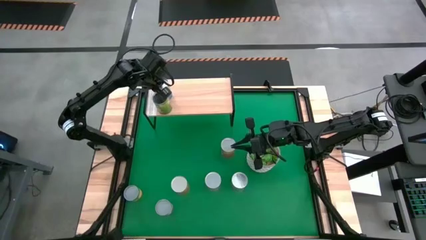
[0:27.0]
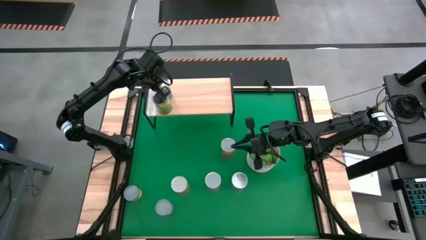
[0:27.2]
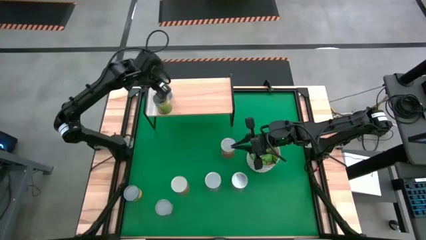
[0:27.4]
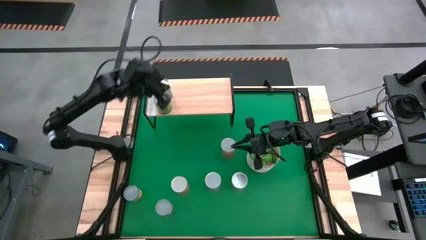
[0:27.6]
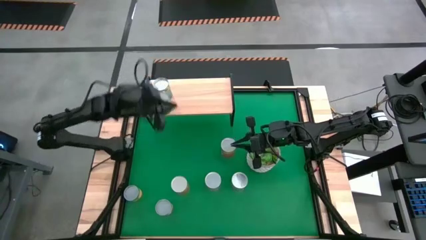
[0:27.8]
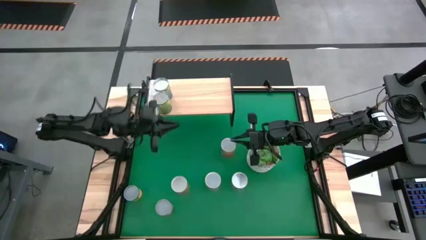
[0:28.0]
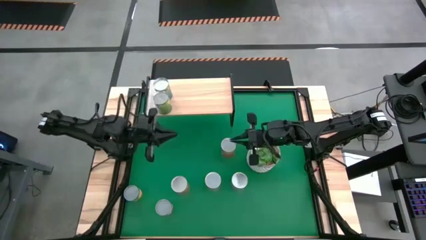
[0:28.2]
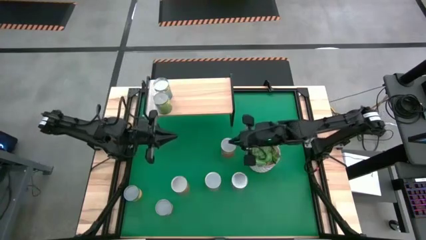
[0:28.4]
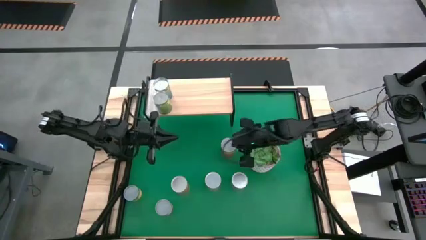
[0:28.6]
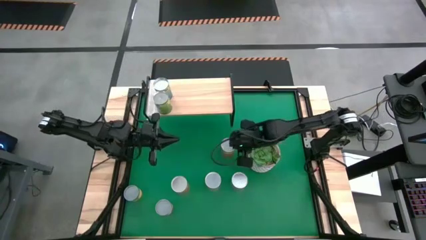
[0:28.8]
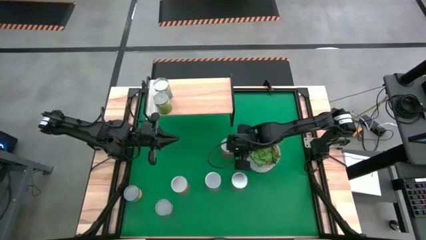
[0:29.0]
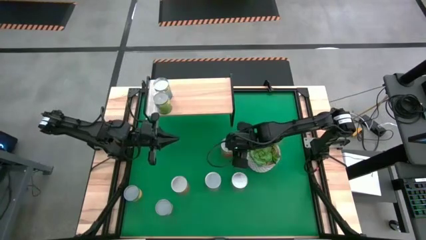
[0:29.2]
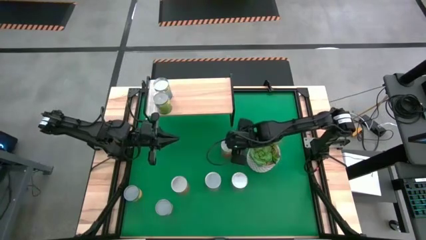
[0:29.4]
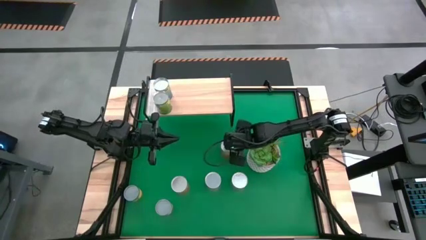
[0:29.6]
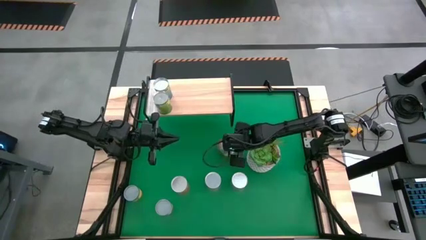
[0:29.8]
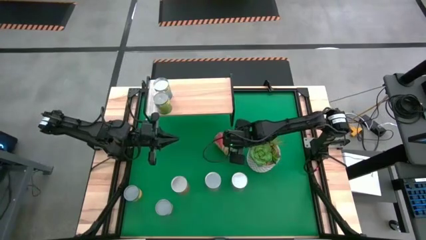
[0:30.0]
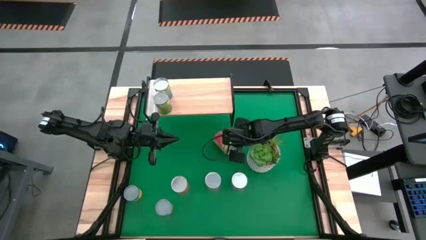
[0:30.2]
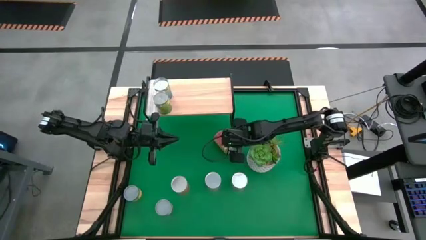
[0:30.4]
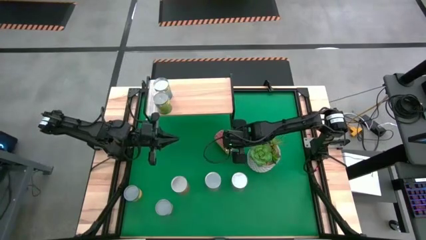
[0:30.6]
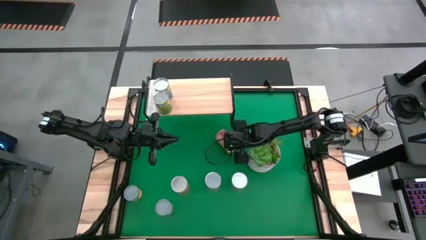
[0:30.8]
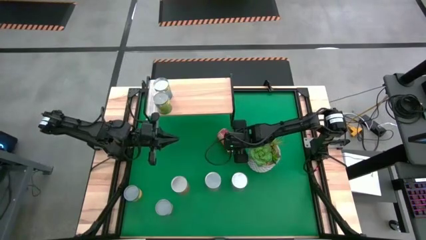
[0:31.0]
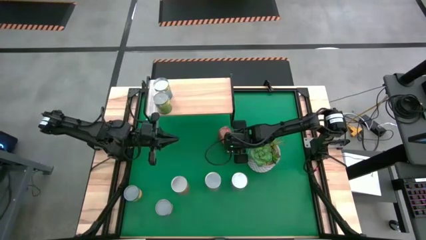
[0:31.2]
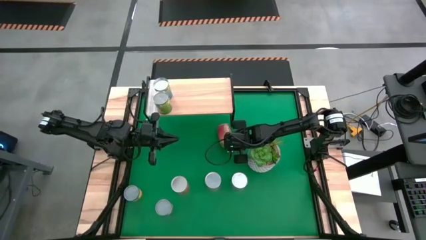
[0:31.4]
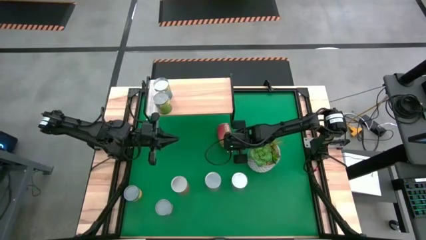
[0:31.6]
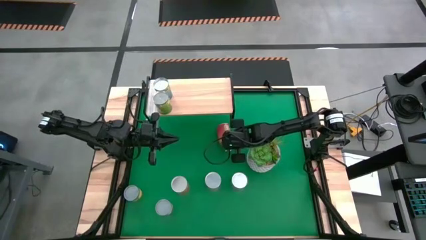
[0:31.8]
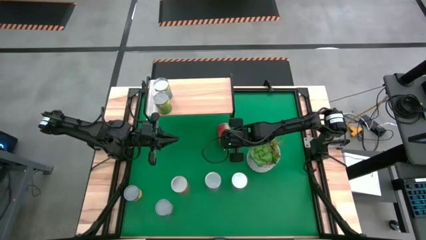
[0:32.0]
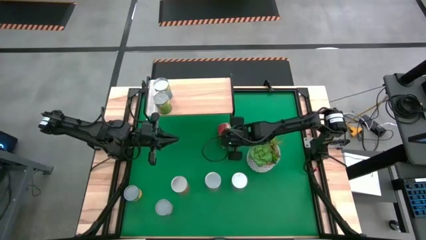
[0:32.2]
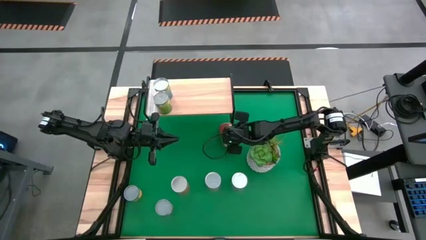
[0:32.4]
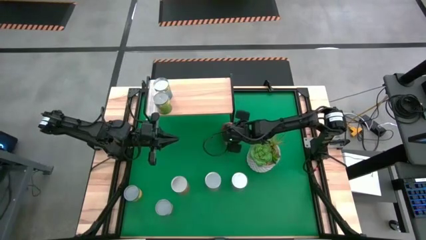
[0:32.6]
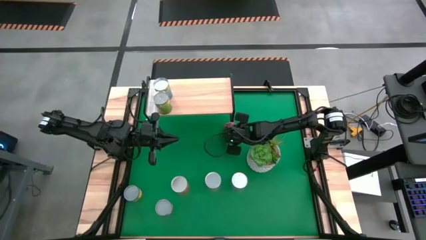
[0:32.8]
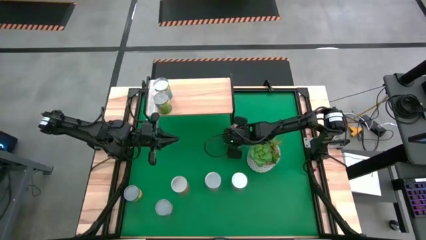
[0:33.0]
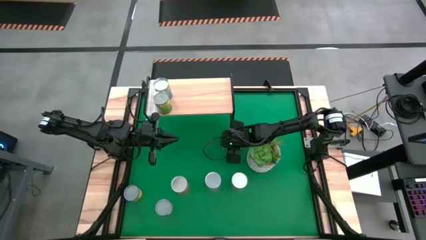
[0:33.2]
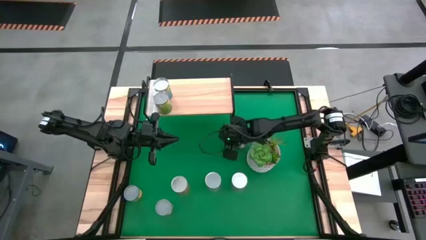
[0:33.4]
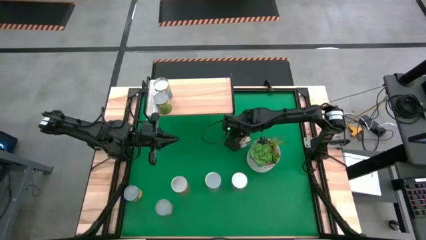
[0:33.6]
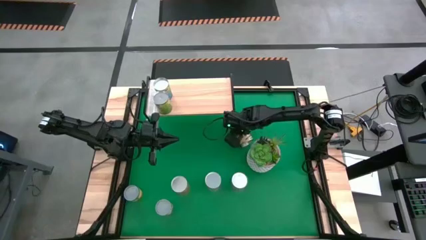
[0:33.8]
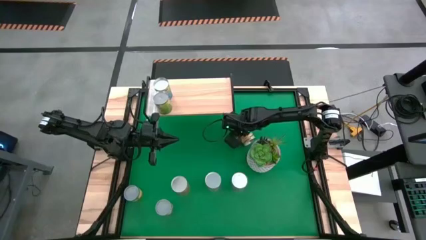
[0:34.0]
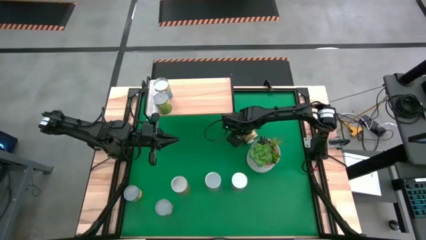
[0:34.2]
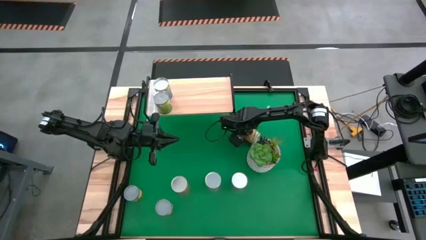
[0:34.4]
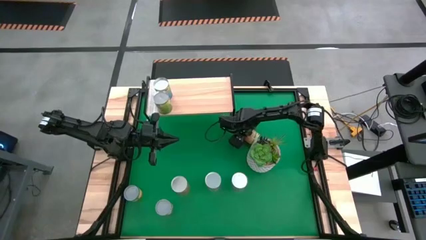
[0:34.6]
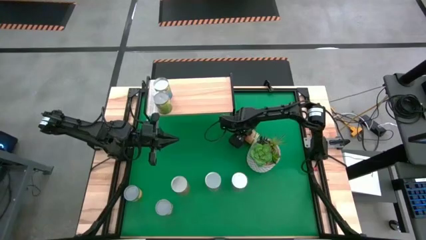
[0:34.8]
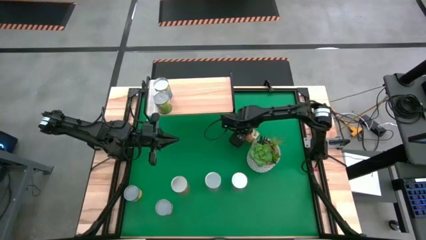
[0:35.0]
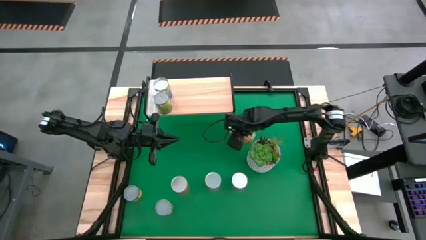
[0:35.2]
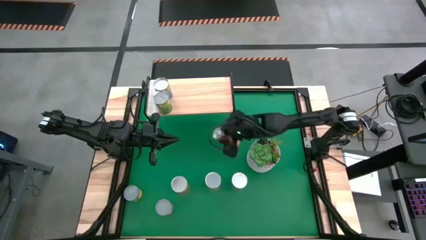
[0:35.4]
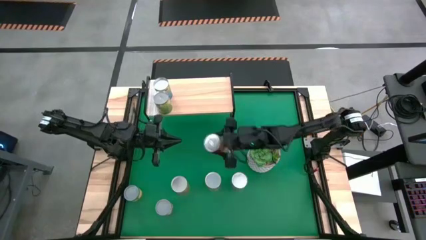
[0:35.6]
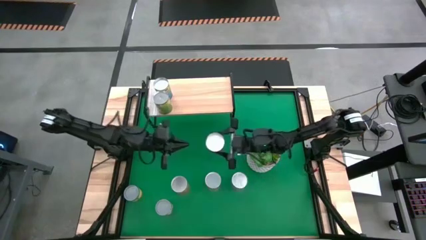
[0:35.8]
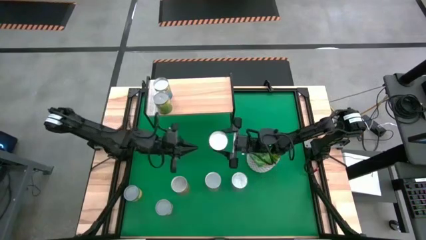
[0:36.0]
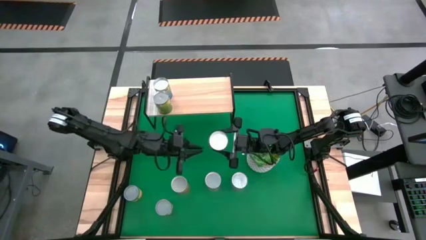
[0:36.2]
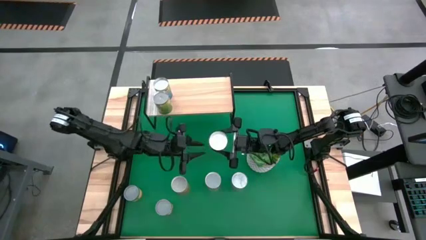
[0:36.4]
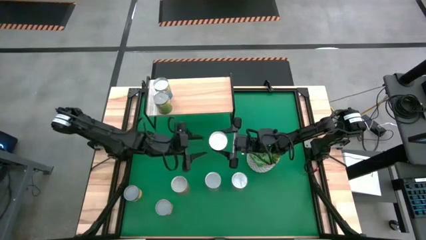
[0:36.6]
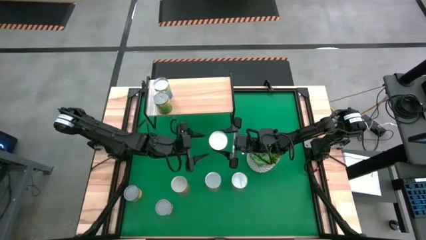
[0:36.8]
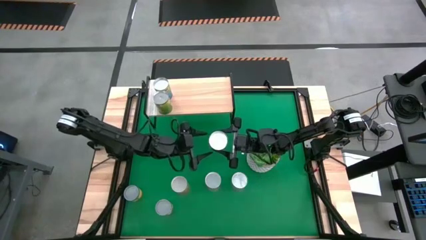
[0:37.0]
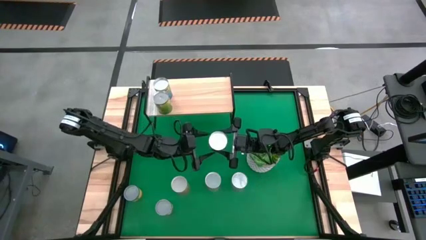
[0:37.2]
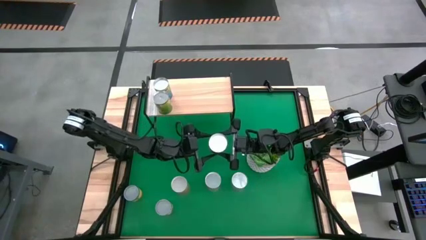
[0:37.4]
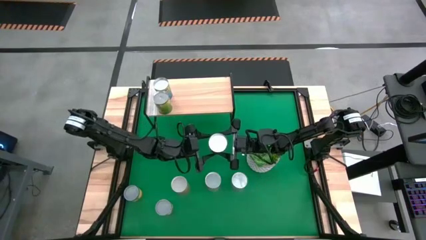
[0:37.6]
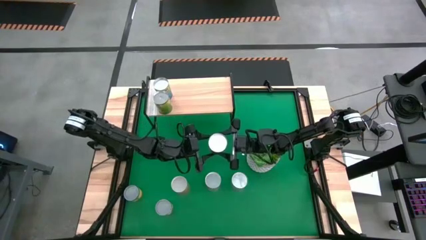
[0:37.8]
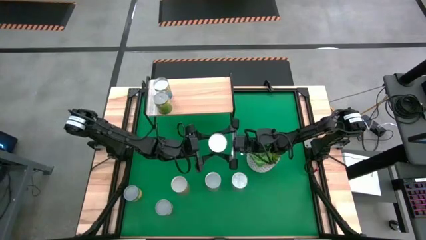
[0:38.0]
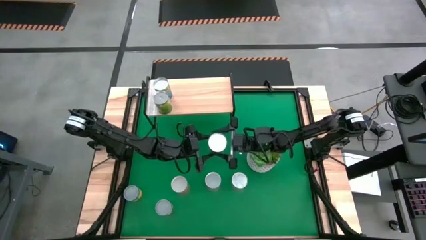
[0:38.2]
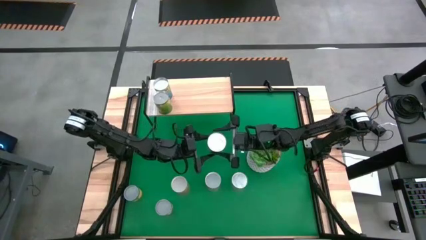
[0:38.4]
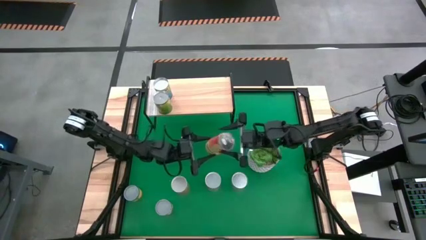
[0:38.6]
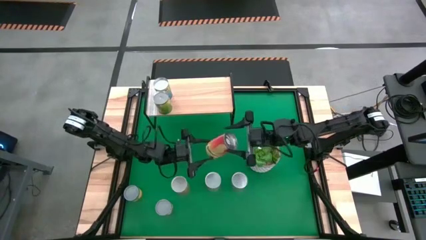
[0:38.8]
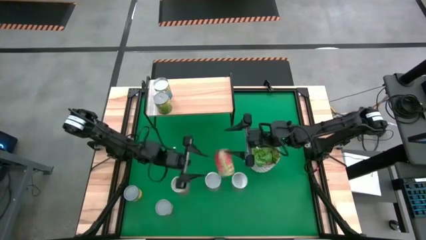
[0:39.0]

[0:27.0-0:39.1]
Task: Pick and place cans onto a shelf
Put the top canned pineapple on the shelf

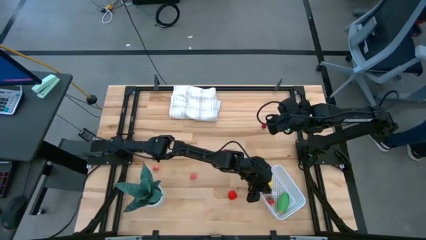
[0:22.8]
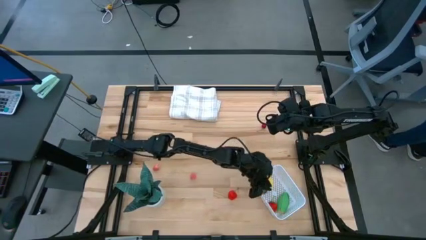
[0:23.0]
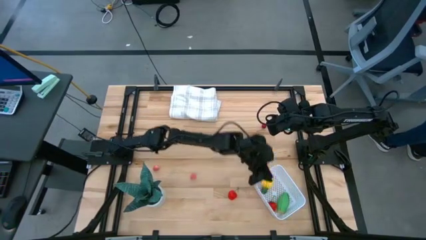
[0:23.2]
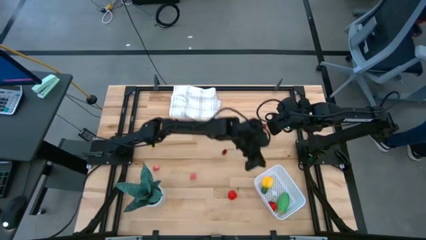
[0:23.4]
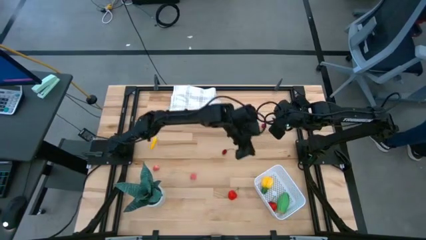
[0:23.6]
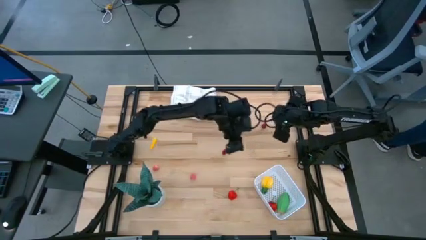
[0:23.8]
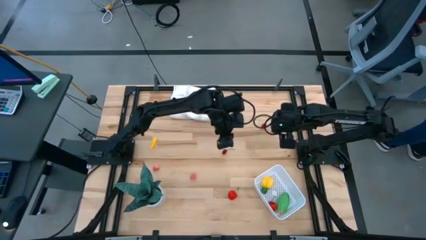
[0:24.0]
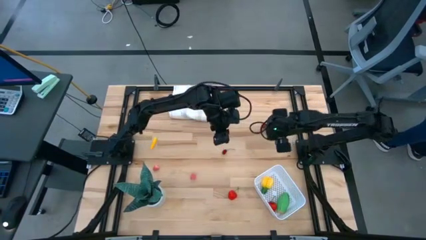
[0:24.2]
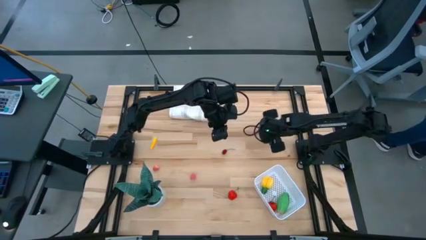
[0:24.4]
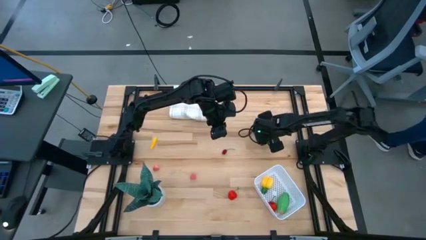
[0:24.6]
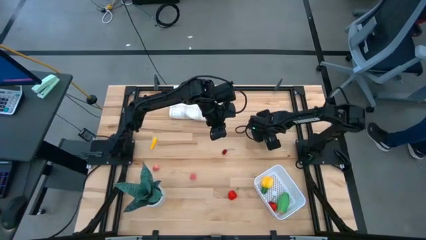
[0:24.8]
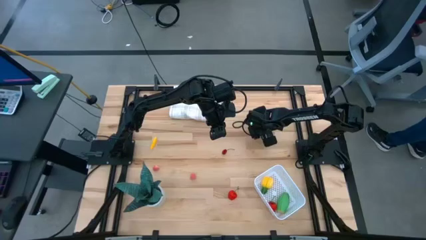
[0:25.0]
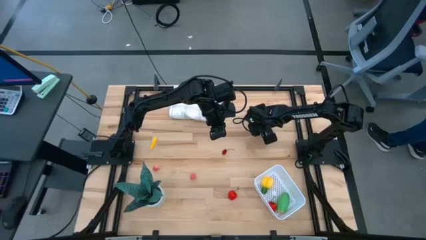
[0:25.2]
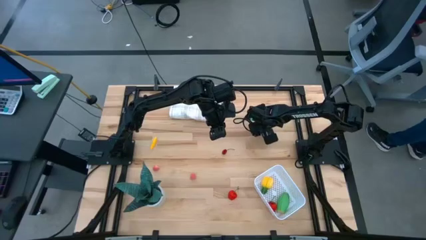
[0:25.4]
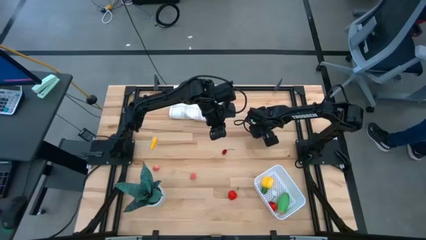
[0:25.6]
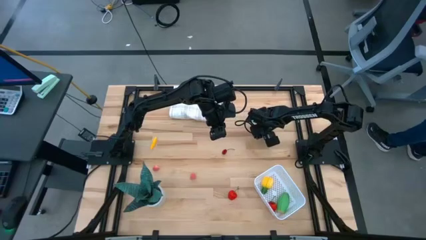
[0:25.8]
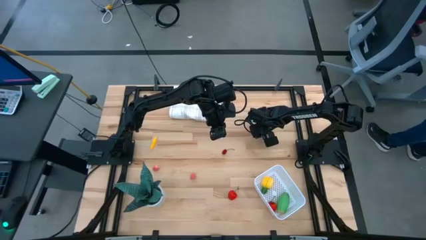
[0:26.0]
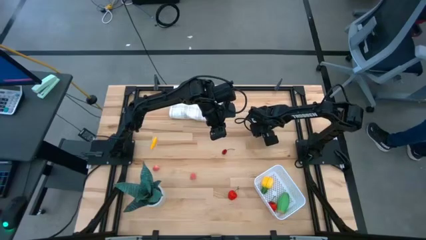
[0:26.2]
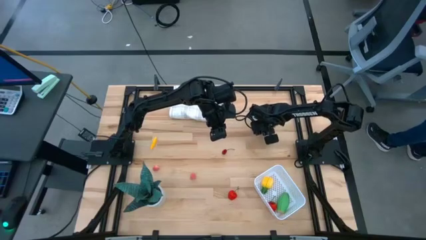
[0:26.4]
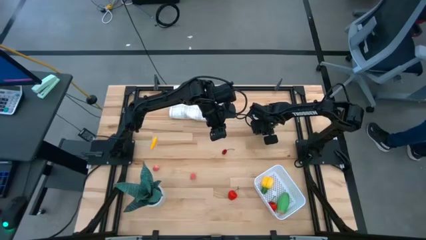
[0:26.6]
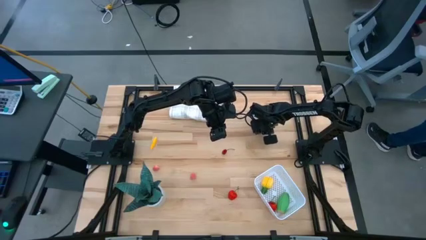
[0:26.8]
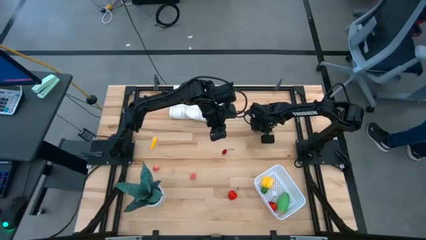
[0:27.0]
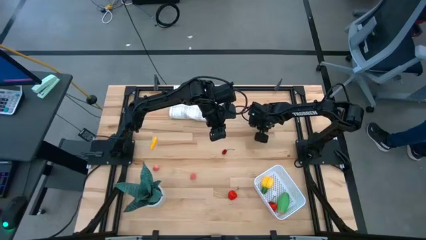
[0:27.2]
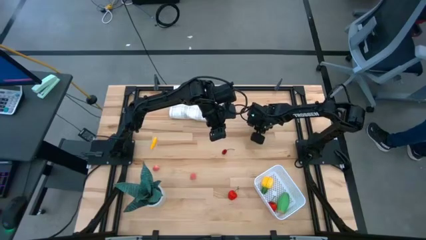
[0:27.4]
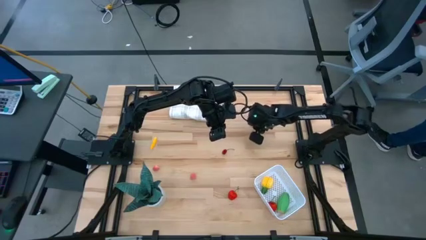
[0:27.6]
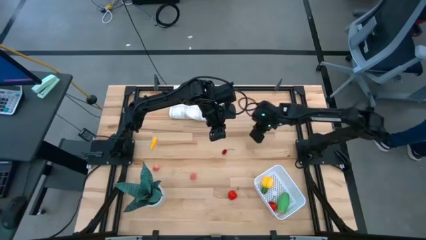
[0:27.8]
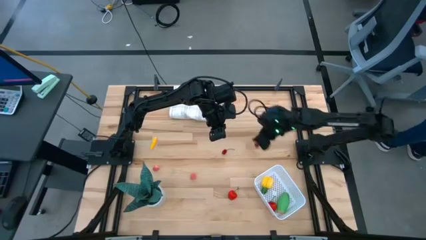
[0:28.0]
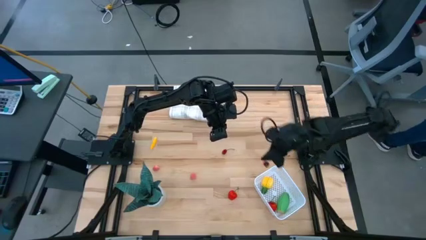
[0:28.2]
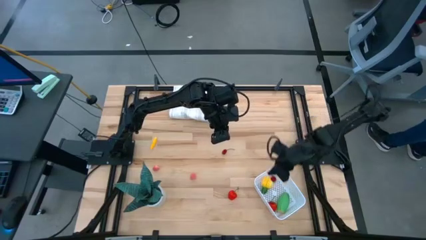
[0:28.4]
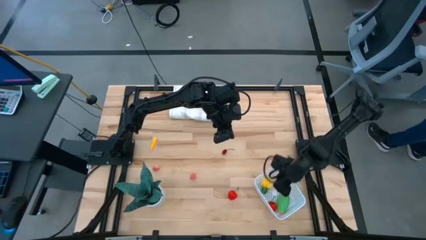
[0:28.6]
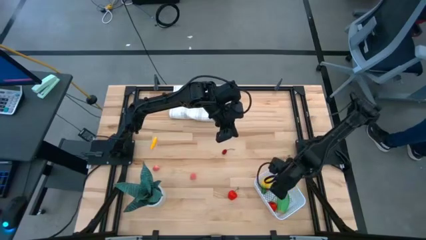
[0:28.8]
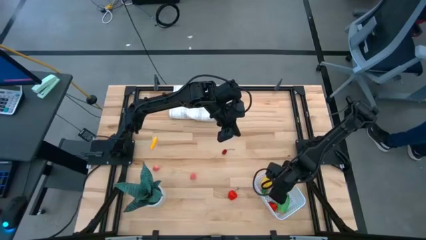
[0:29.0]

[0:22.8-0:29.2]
Task: Pick and placing Produce into tupperware
Put the top red cherry into the white bin
